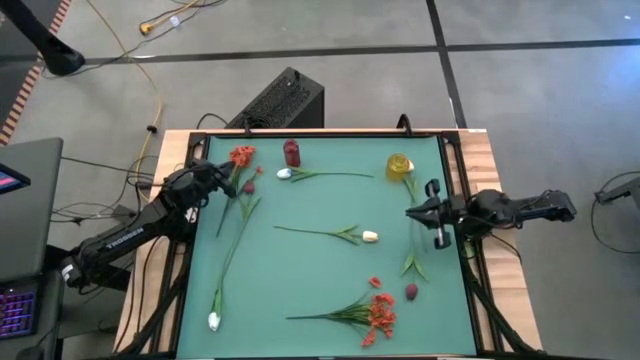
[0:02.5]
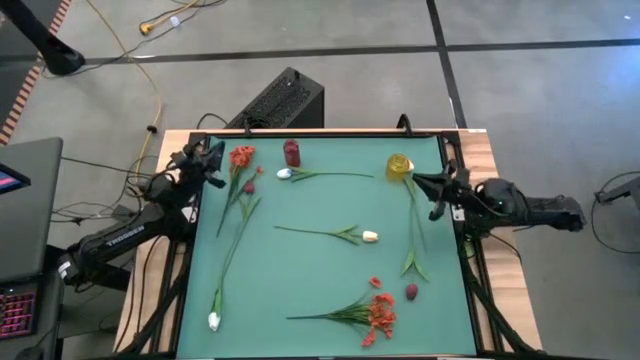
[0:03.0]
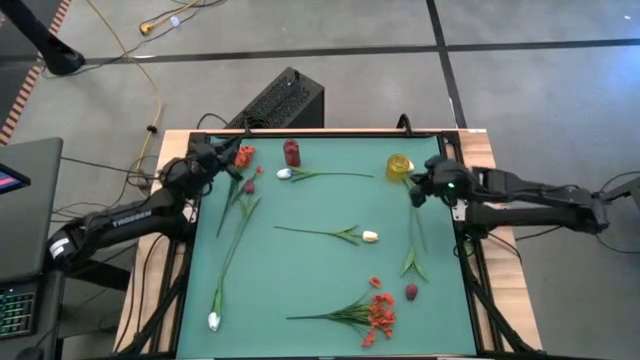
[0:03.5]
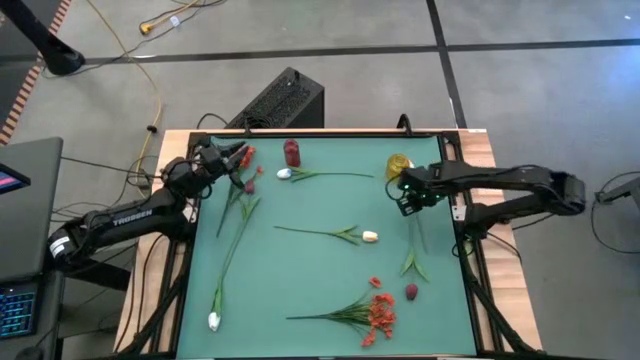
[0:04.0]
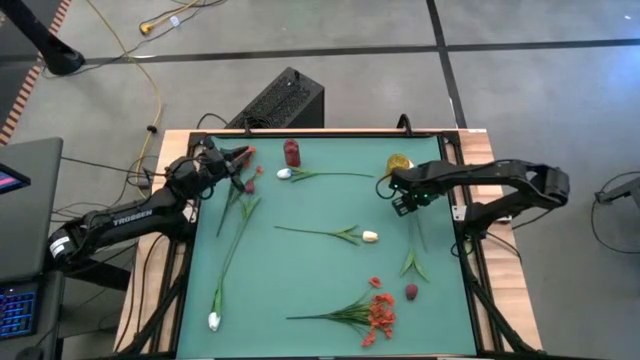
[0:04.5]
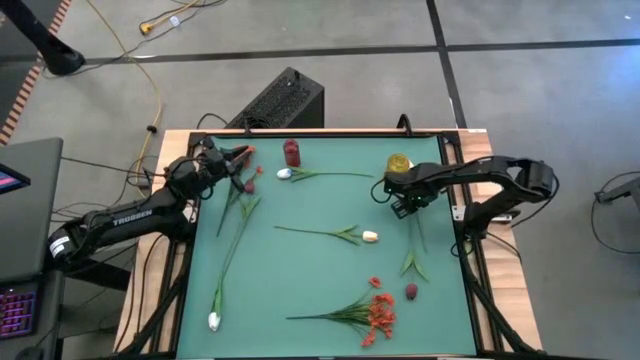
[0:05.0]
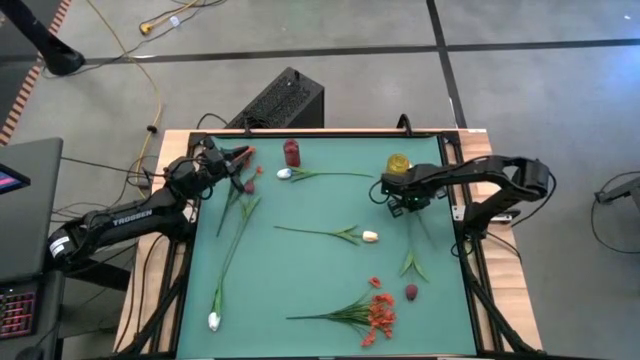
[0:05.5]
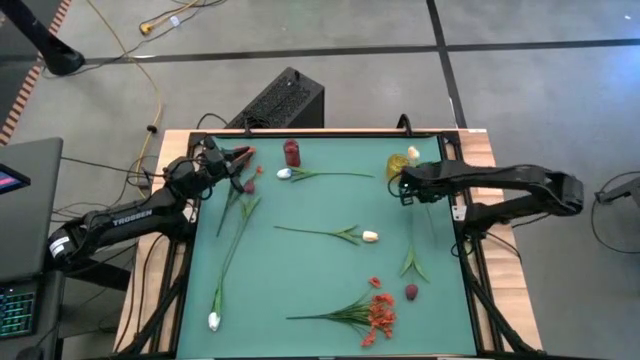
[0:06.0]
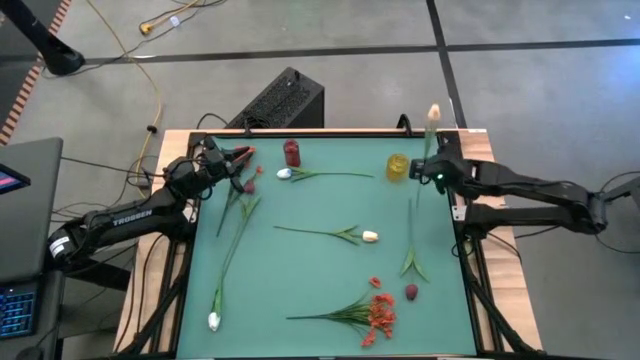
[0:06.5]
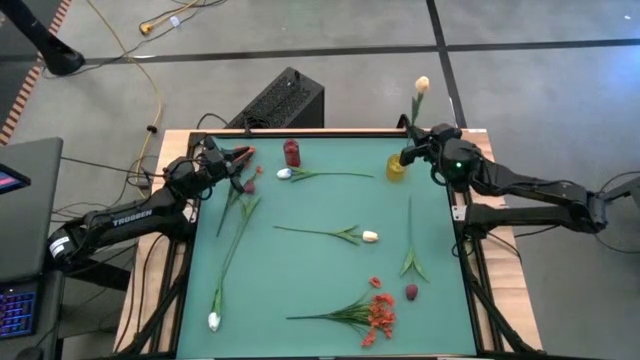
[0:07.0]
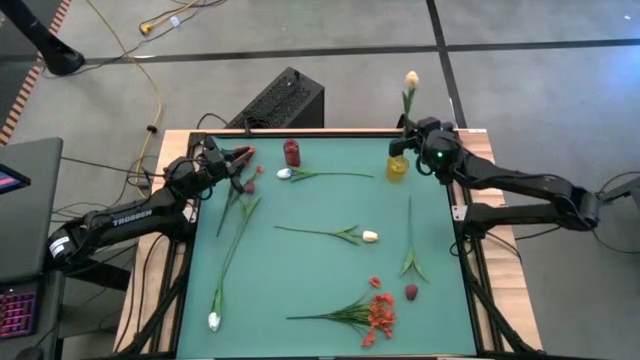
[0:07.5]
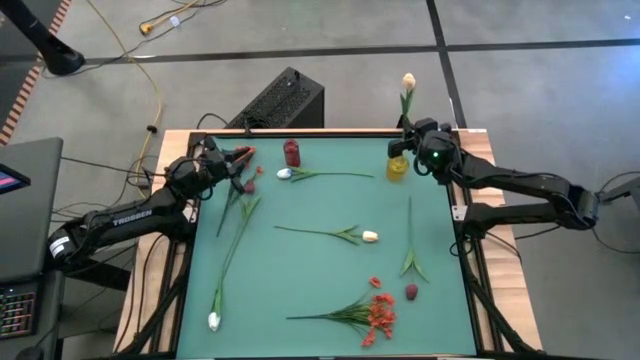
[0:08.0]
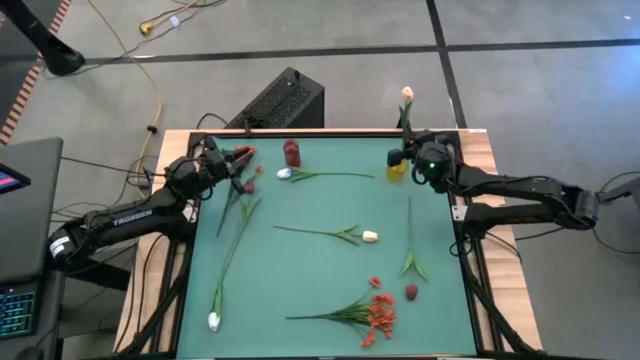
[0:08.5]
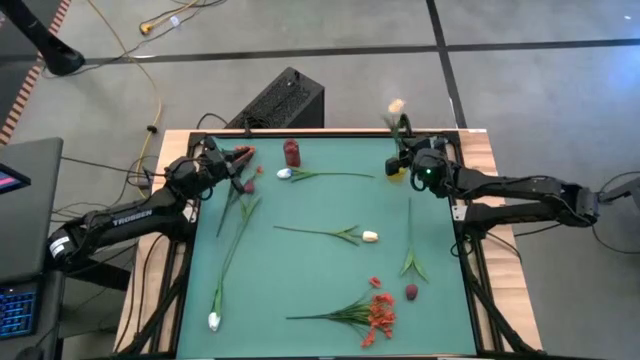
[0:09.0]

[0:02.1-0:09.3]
Task: Sort flowers into vase by color
Put the right yellow flower into the yellow vase

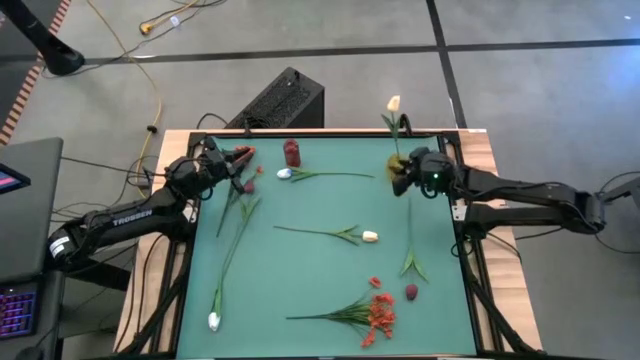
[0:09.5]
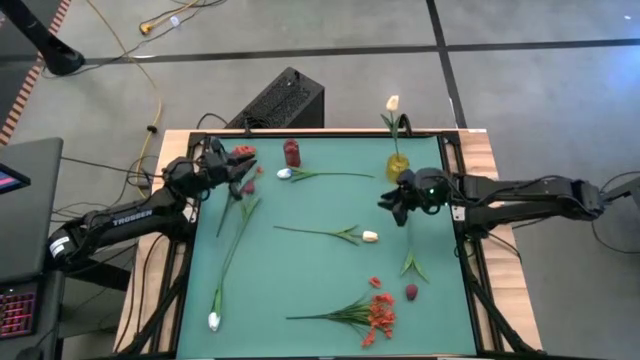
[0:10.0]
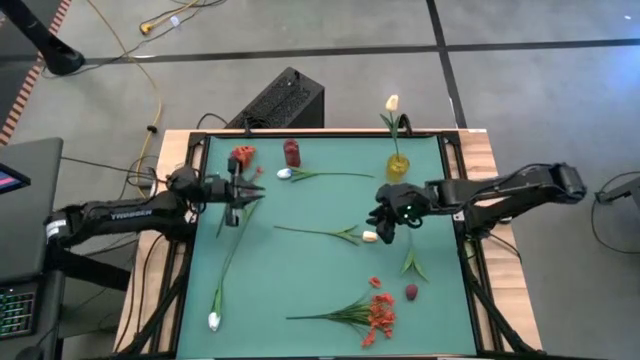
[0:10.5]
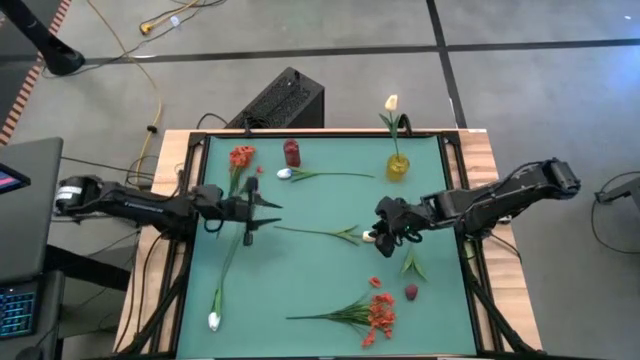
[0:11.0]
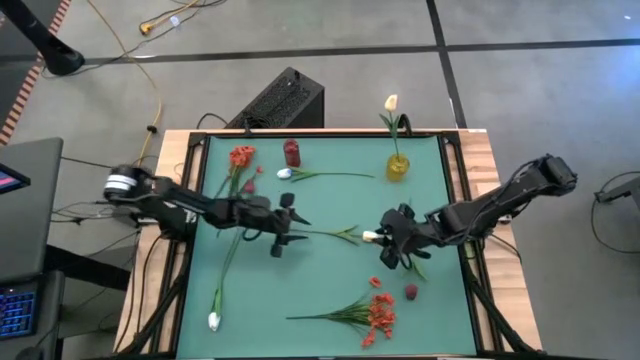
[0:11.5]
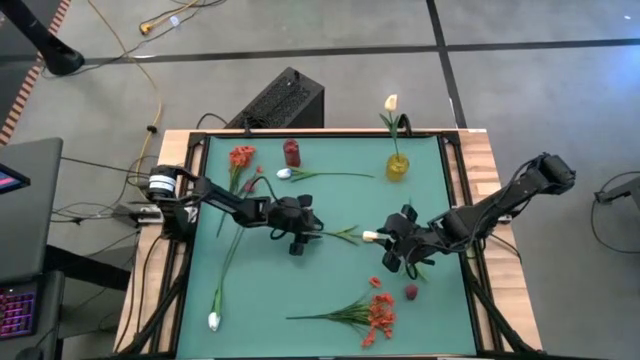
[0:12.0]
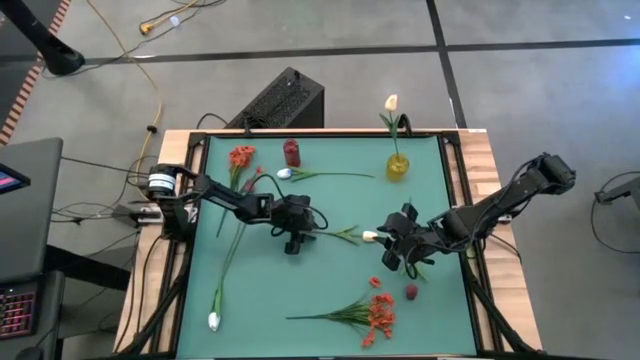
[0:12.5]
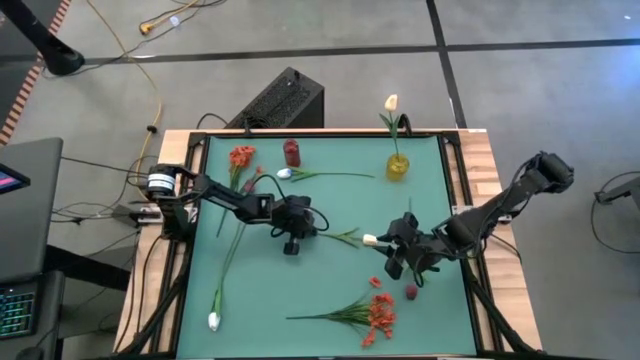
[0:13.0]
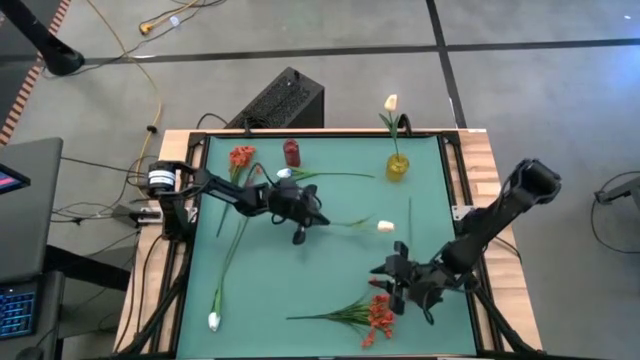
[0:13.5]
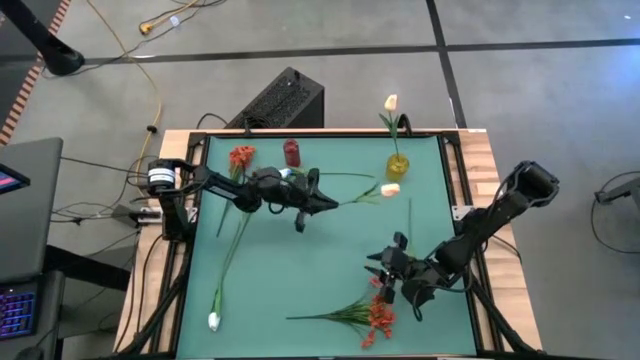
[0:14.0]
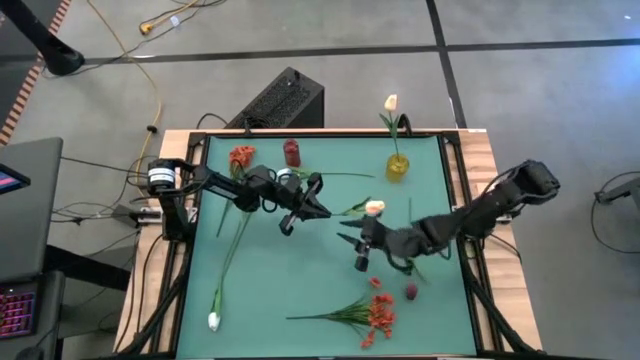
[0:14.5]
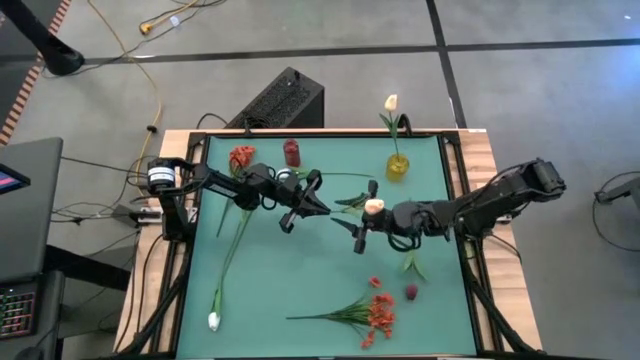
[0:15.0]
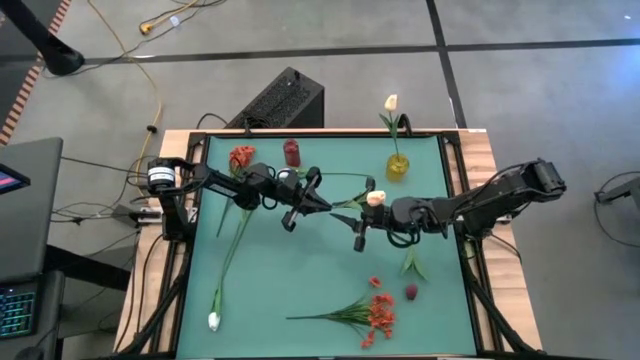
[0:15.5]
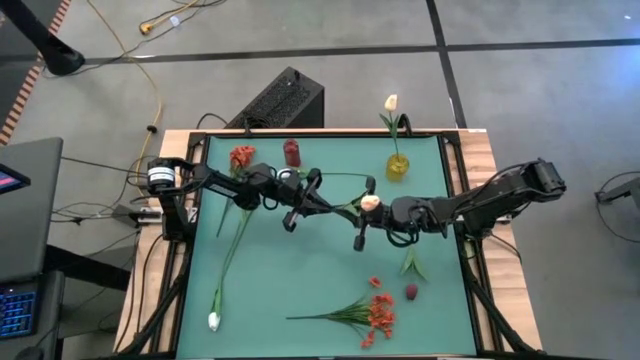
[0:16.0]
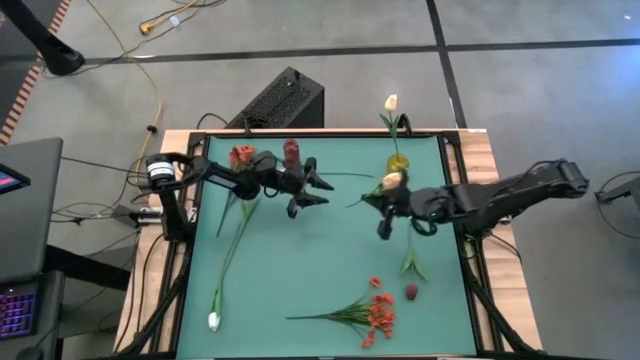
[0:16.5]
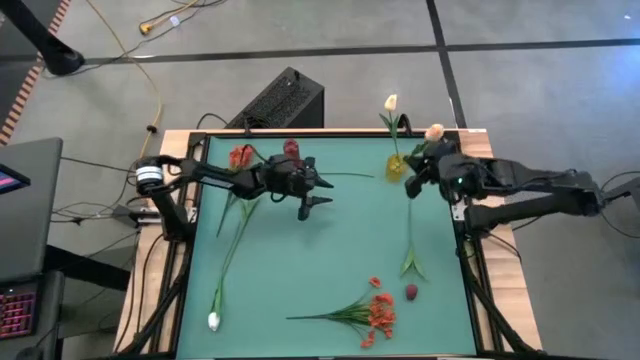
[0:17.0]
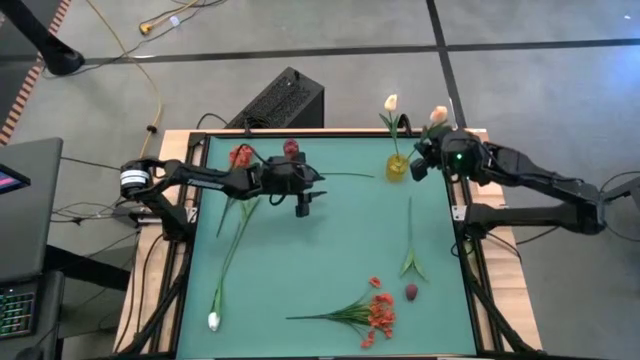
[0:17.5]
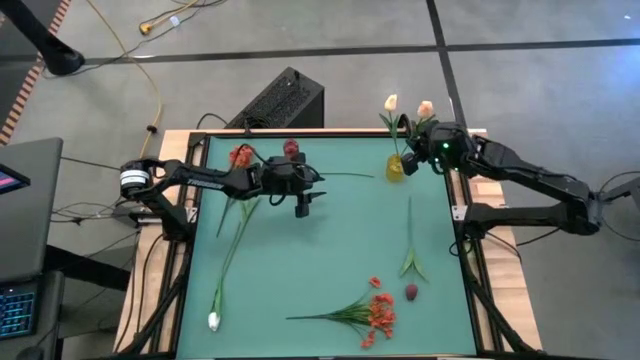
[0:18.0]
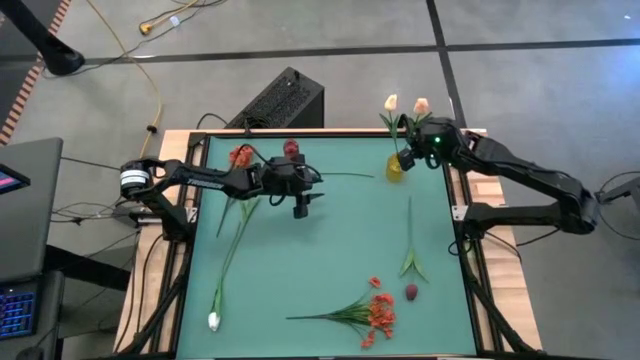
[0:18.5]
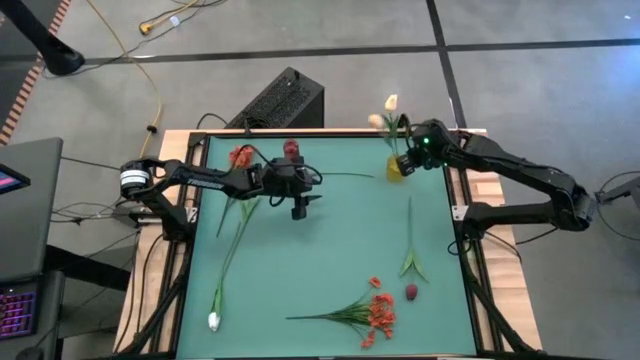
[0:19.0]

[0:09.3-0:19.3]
Put the yellow flower into the yellow vase

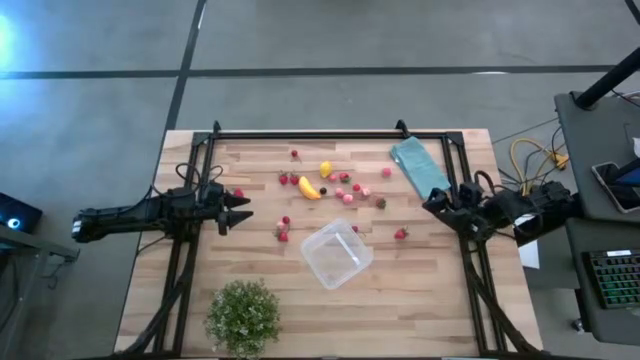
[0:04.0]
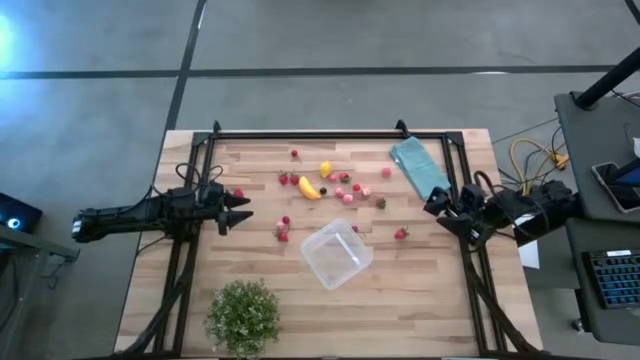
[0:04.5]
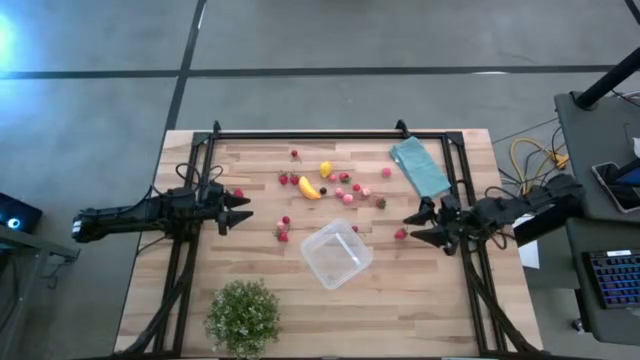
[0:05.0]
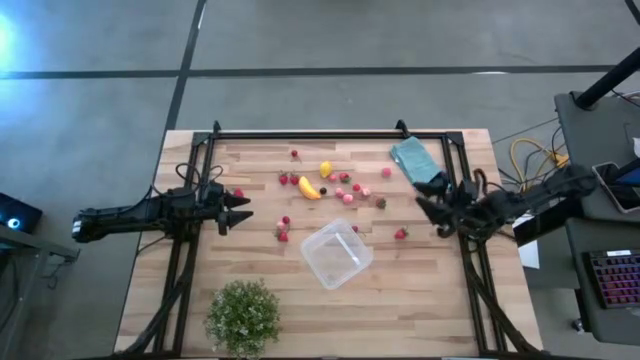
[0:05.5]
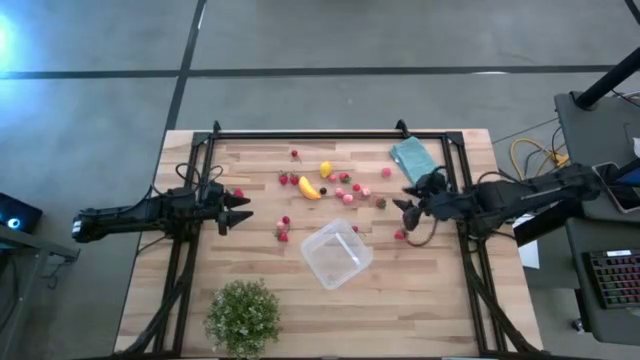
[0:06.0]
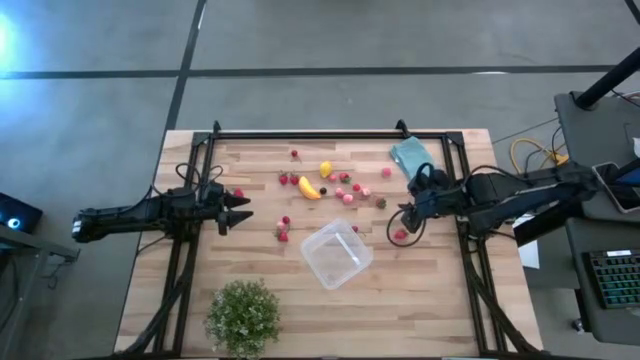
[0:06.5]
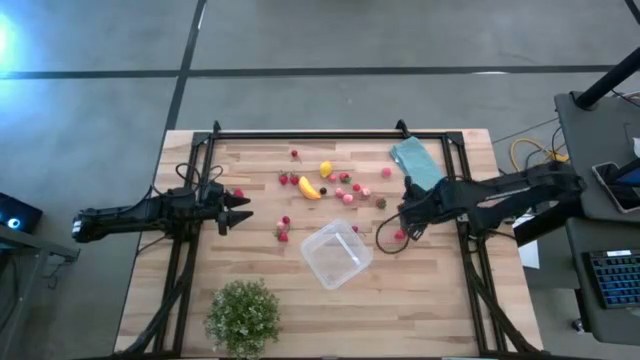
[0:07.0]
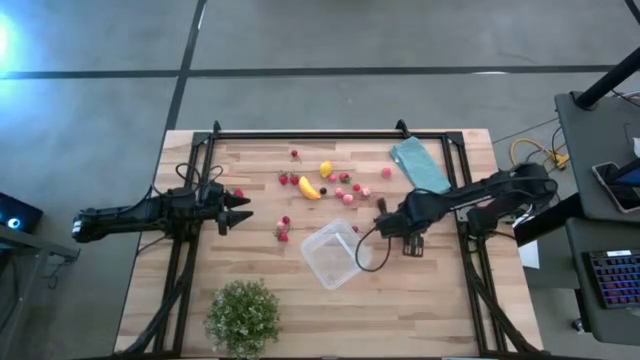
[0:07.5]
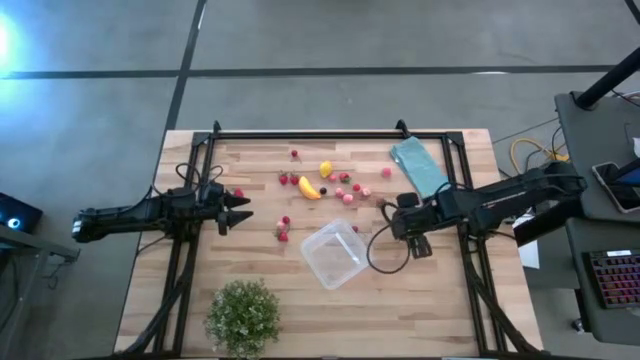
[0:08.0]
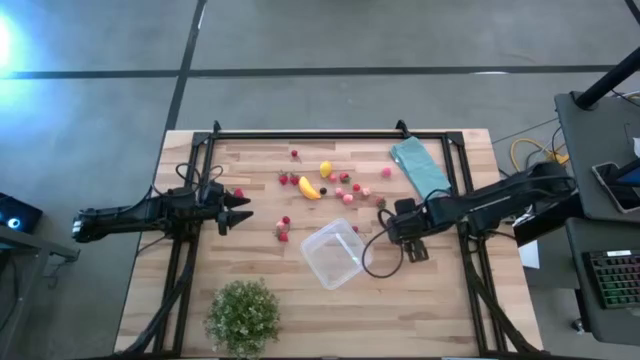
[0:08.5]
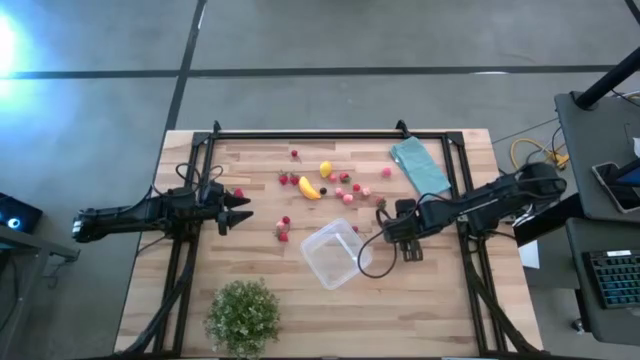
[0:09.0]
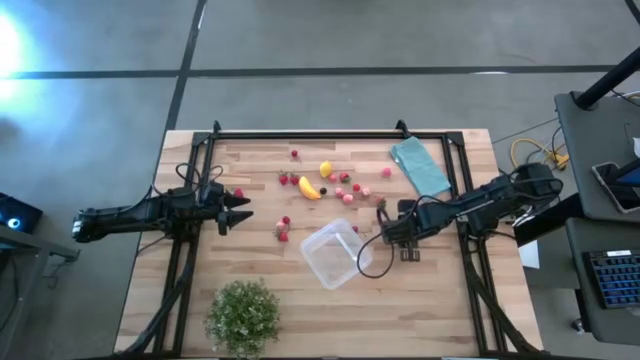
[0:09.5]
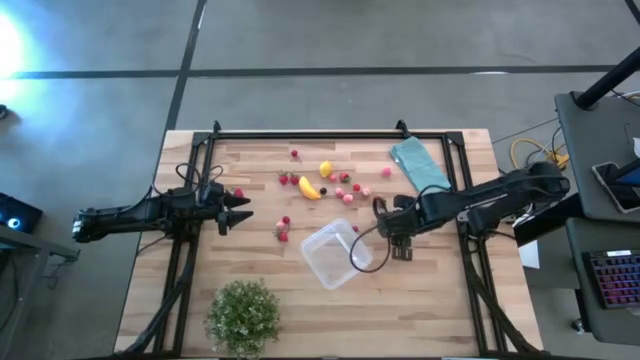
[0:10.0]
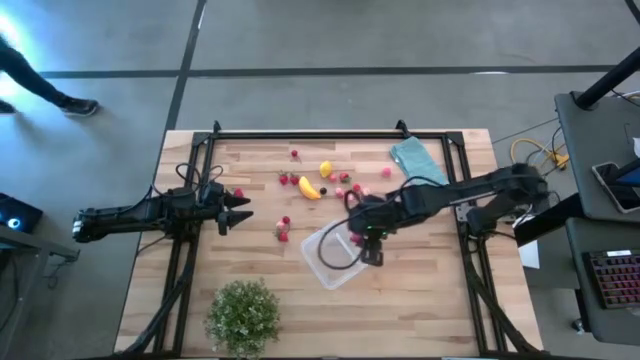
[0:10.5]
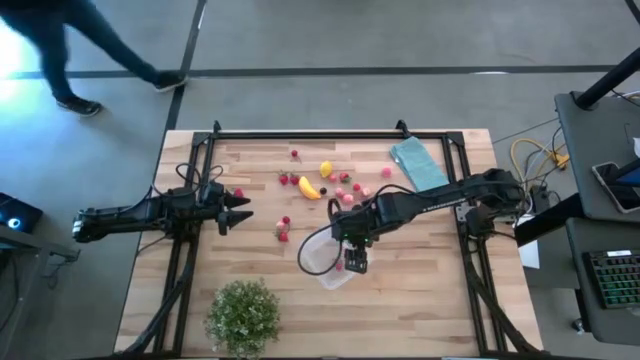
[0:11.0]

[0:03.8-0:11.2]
Task: Pick and placing Produce into tupperware
Put the strawberry into the transparent bin
